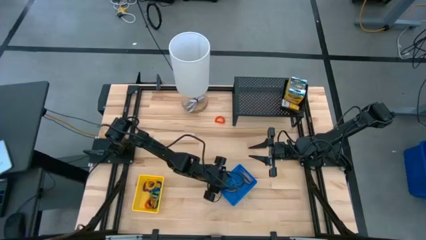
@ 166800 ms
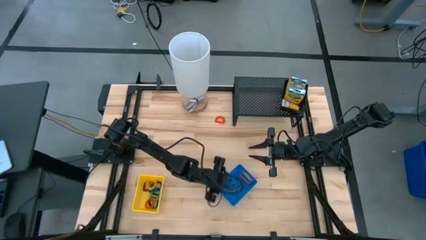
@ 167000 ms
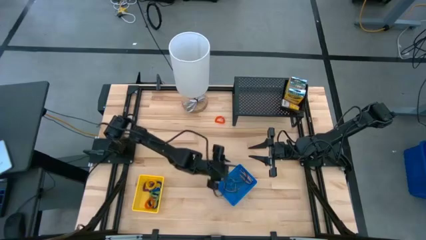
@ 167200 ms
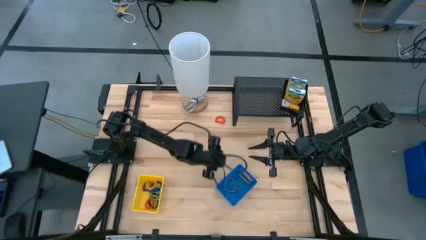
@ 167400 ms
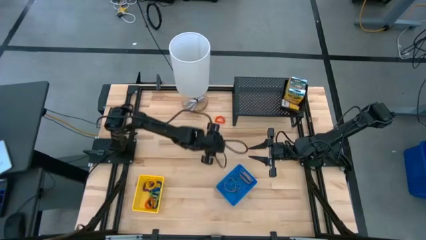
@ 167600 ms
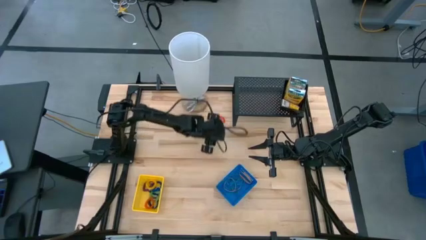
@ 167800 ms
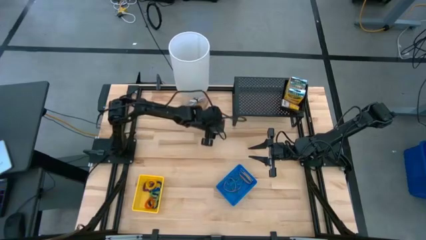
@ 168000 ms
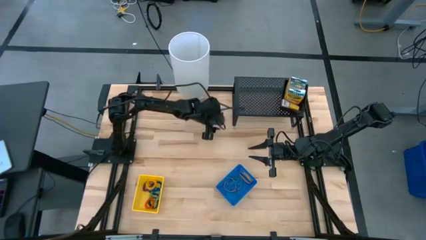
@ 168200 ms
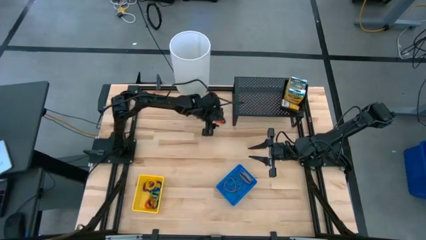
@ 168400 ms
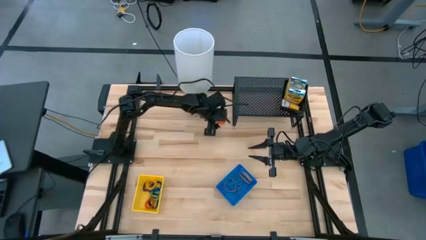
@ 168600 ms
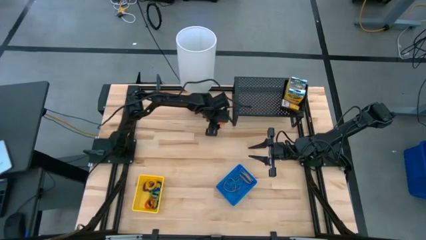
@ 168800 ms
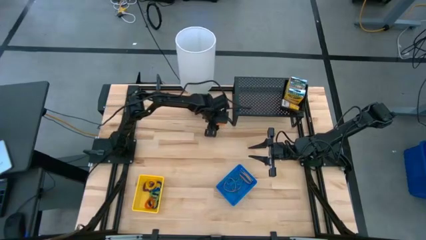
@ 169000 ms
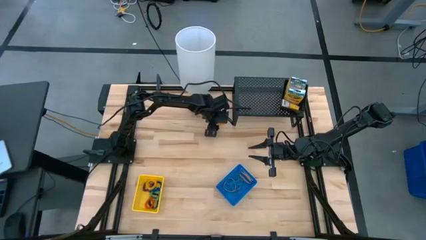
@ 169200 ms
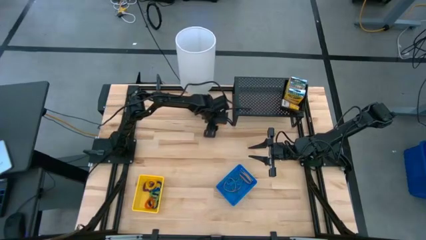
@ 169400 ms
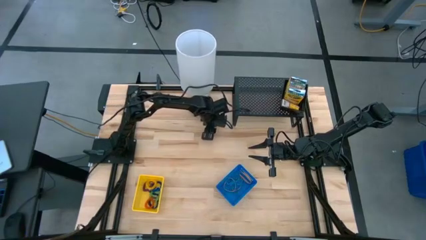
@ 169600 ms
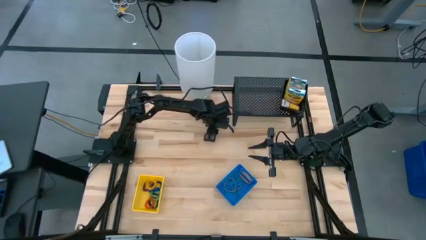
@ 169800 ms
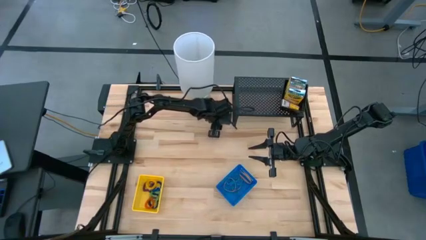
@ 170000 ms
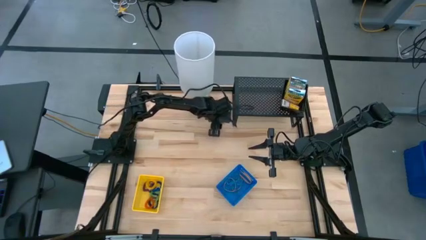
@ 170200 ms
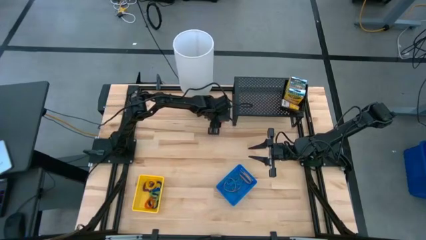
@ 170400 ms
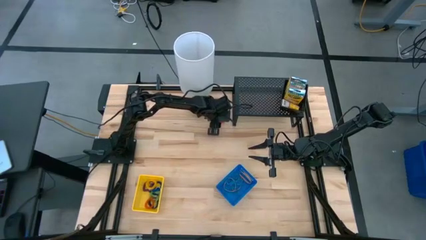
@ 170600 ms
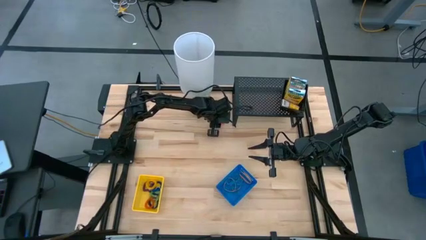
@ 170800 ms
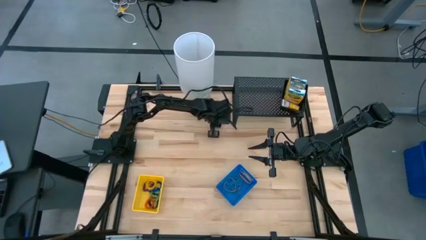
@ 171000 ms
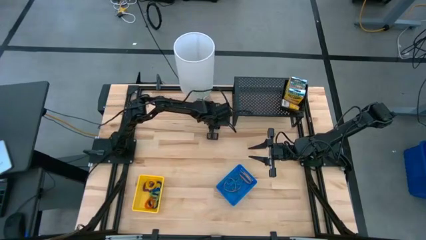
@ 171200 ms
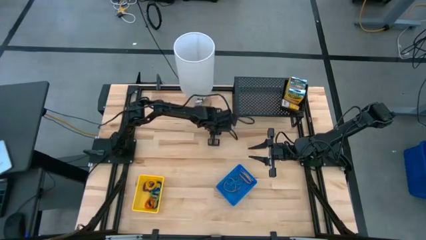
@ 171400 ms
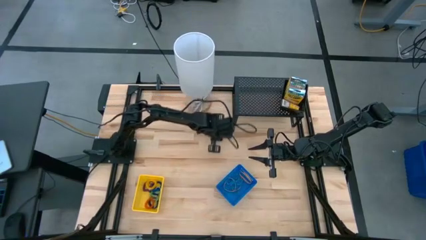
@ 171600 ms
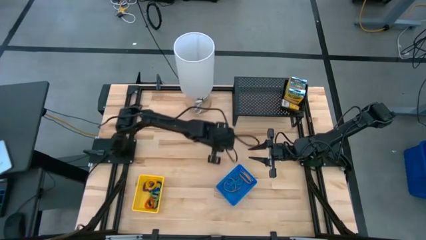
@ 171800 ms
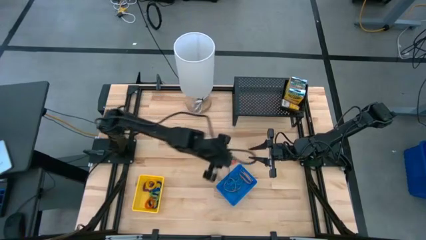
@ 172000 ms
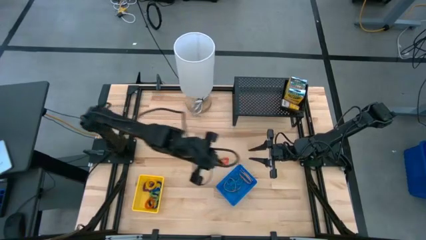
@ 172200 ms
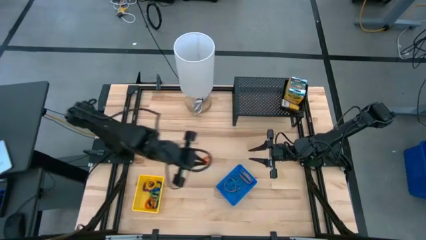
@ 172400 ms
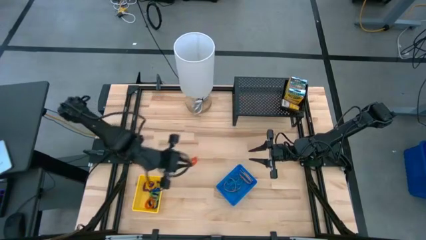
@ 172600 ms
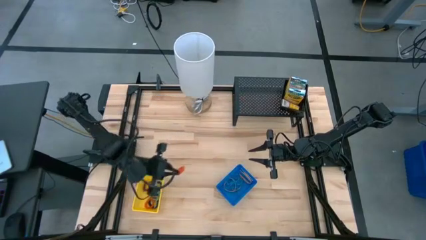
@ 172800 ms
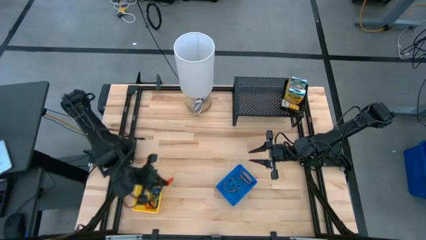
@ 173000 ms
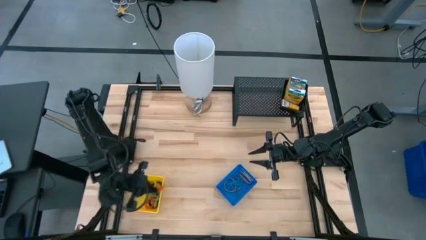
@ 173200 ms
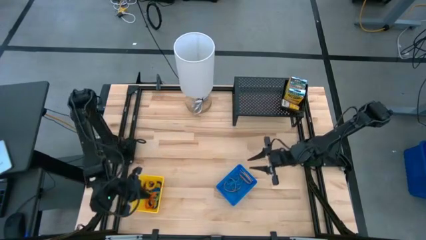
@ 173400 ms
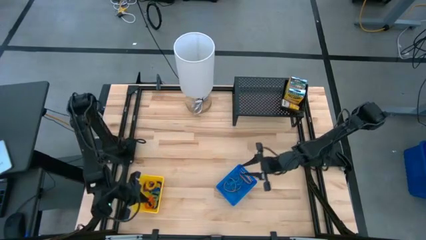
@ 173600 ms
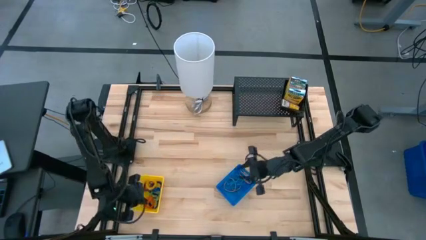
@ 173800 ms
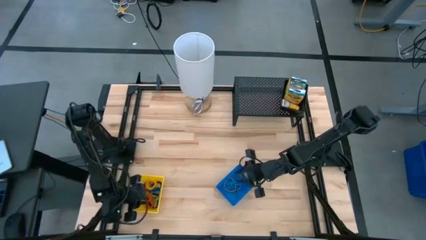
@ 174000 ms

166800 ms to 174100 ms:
Task: Pick & Place Office Desk Supplies
Put the orange spring keychain into the yellow bin

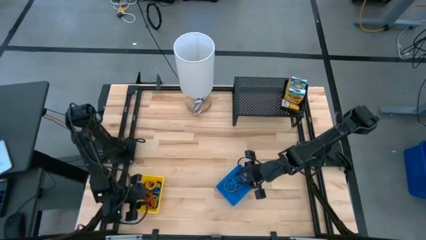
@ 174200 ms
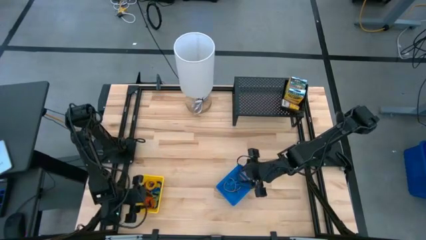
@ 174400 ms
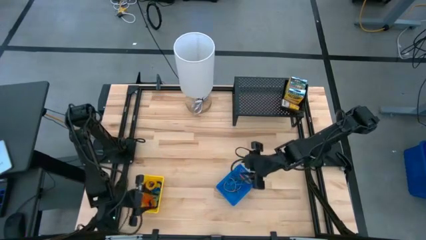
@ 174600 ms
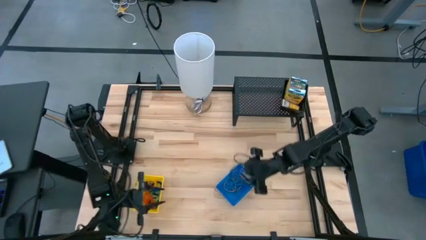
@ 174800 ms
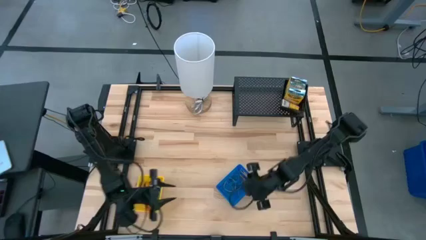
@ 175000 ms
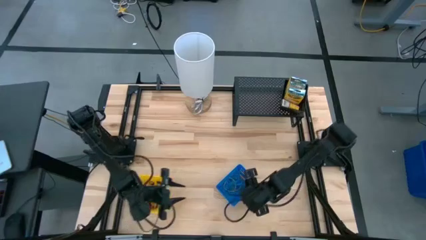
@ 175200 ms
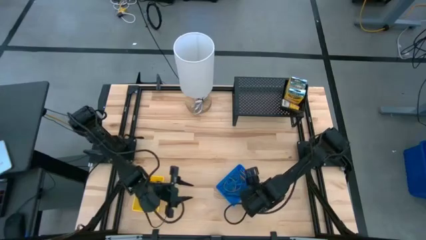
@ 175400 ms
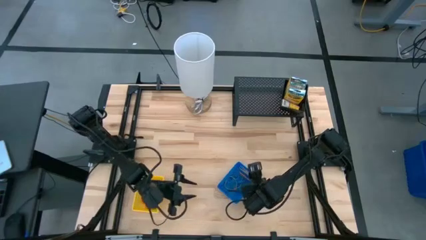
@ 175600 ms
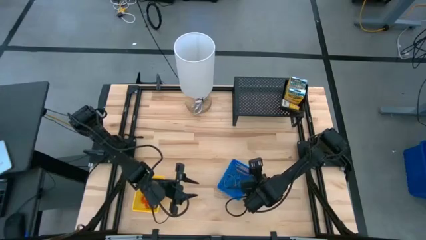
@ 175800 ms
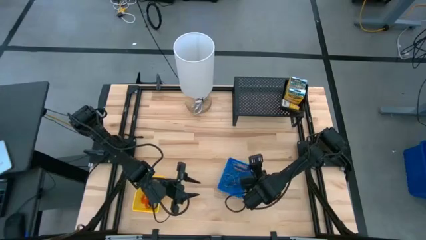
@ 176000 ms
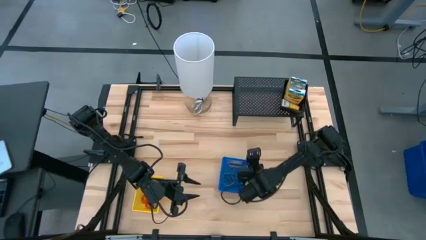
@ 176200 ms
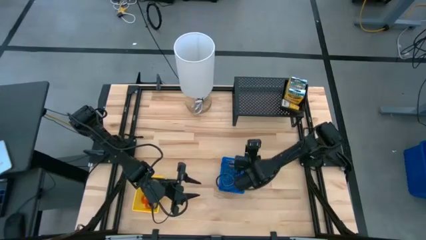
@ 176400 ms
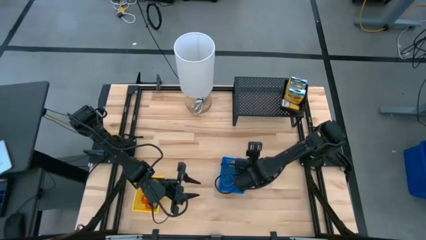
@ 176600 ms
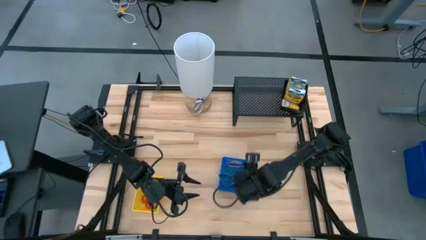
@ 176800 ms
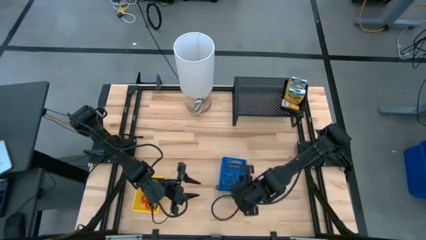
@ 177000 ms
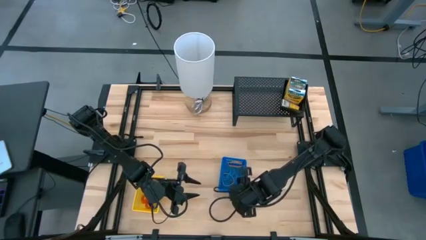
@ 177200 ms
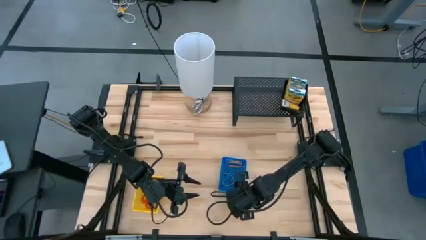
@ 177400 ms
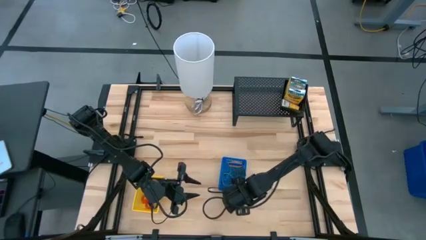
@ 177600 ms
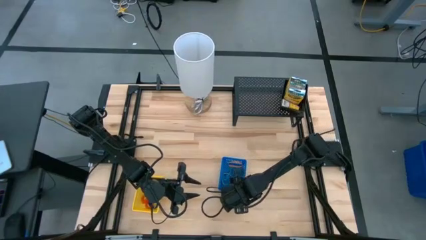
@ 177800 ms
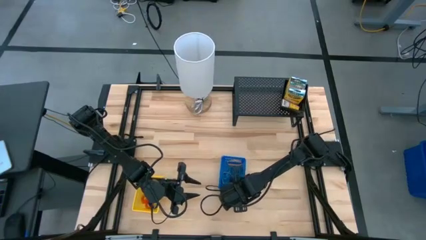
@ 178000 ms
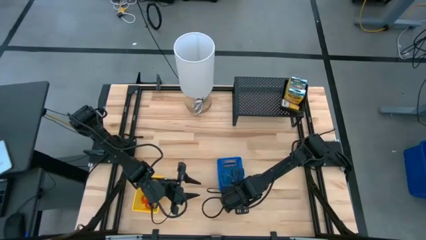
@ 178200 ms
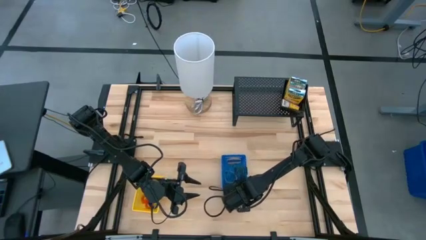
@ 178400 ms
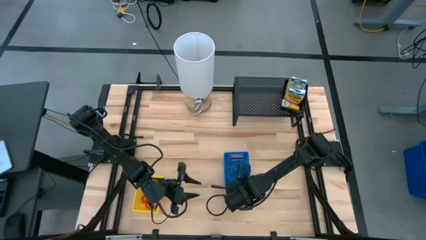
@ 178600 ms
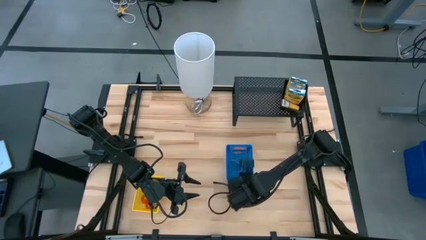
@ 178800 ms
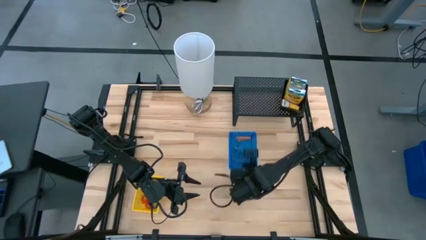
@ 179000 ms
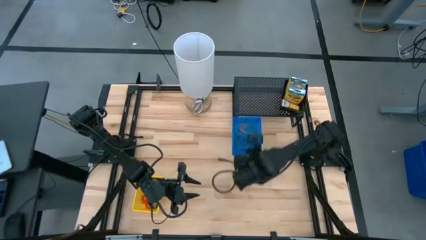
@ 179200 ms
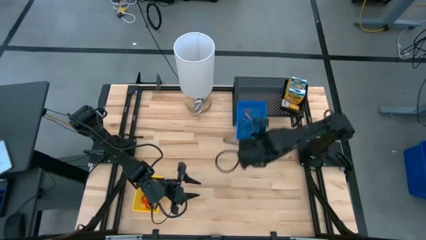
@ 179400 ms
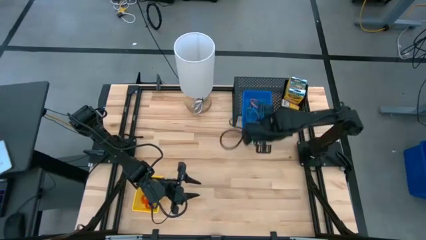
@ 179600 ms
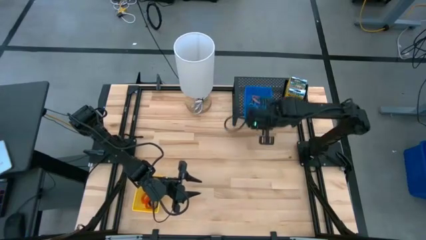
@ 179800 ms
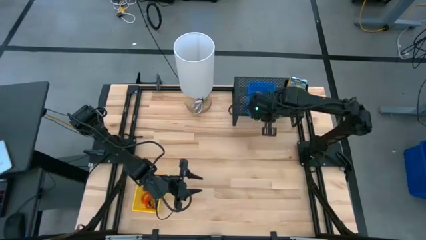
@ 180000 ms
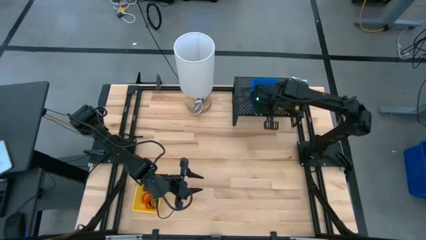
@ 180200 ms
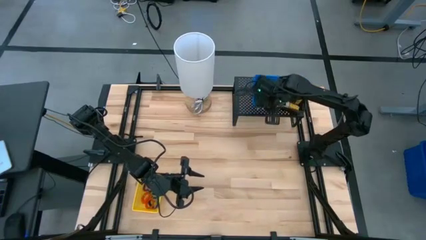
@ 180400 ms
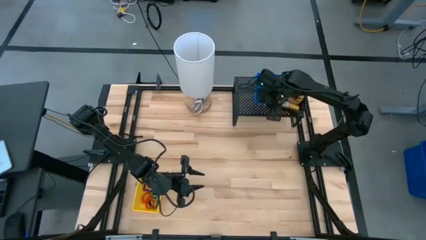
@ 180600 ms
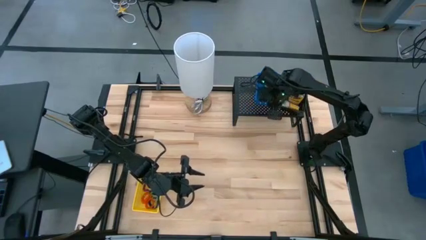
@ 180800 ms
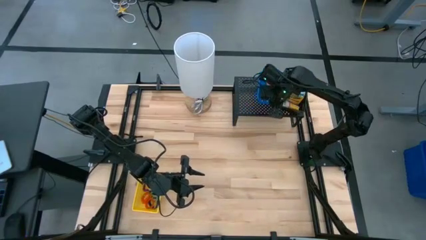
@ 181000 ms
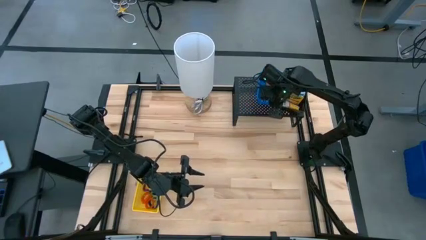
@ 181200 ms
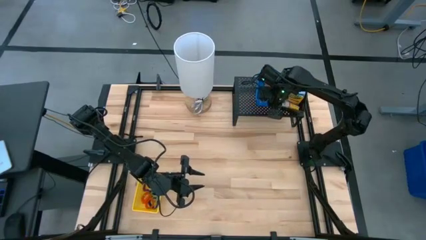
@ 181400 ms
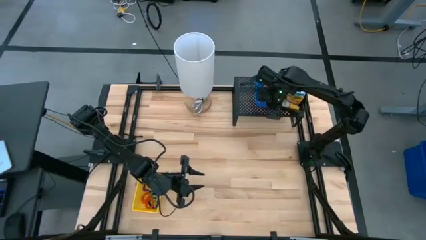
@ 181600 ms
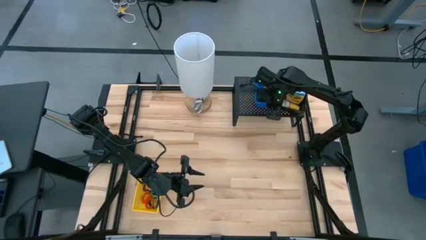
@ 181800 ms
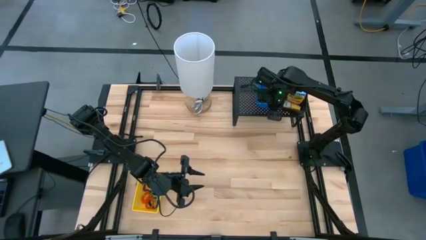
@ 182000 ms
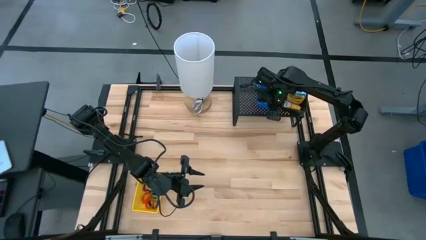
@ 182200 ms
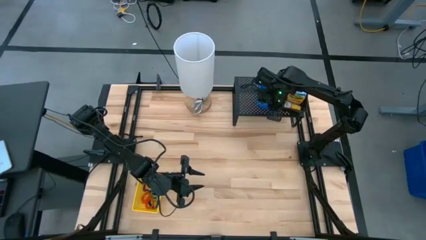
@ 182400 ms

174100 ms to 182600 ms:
Put the blue bin on the shelf
